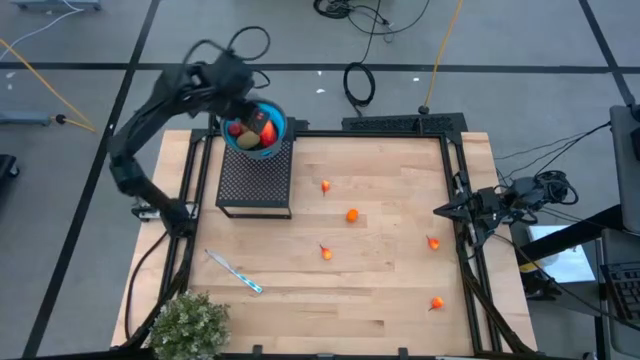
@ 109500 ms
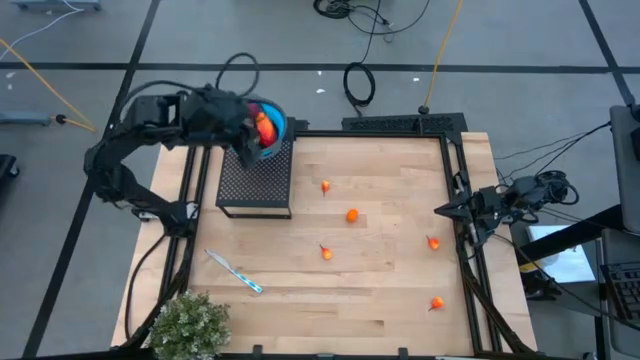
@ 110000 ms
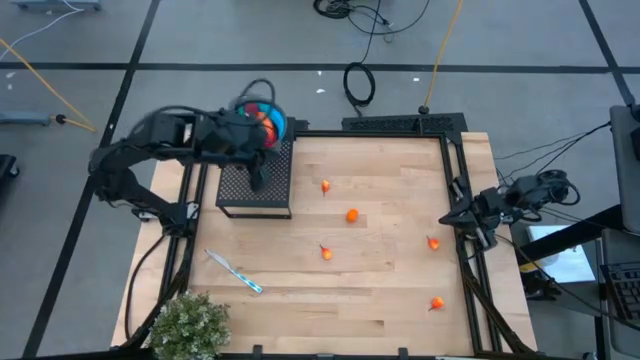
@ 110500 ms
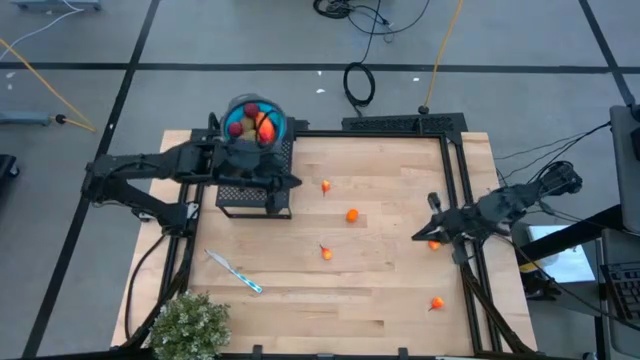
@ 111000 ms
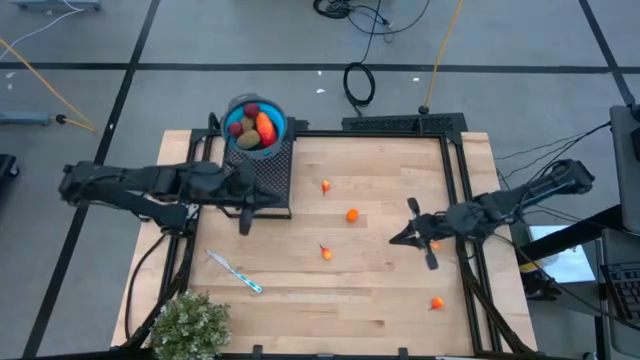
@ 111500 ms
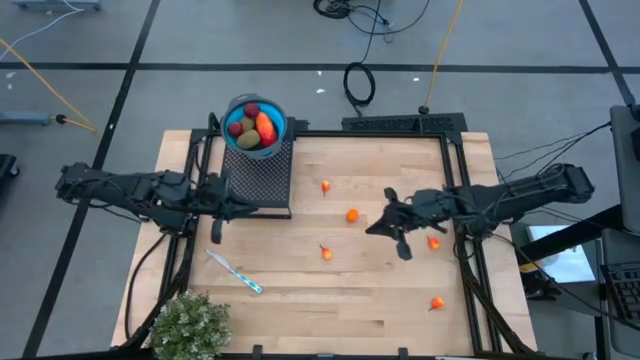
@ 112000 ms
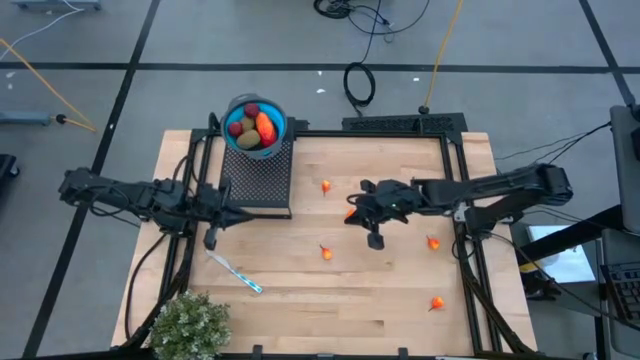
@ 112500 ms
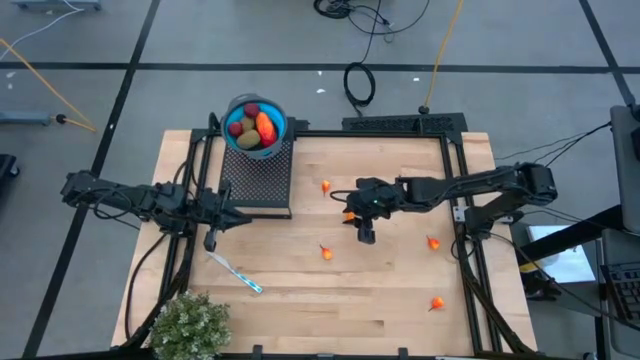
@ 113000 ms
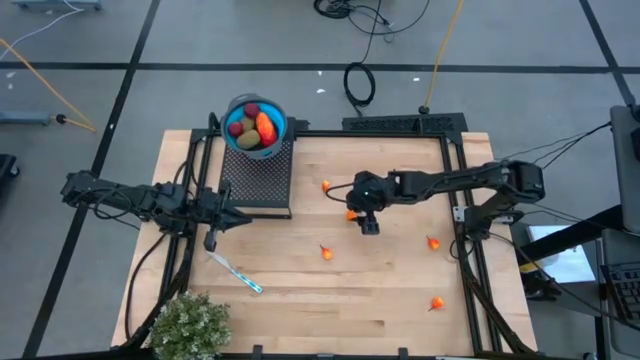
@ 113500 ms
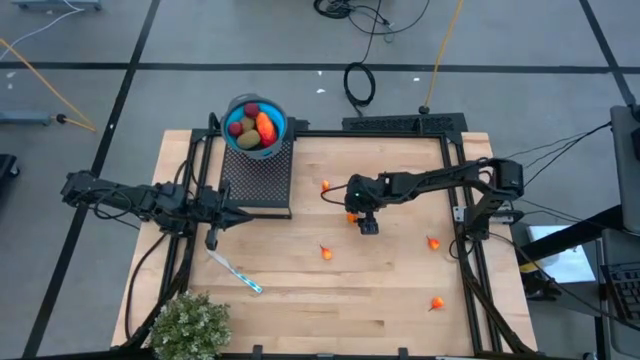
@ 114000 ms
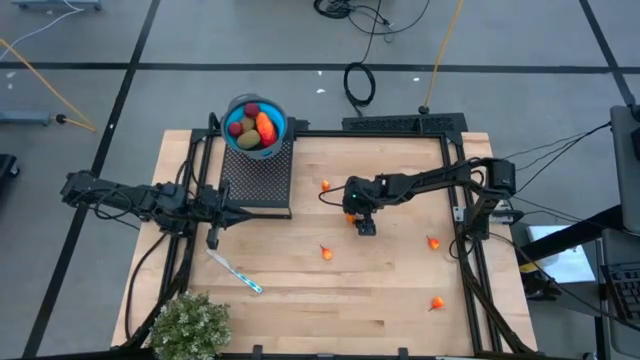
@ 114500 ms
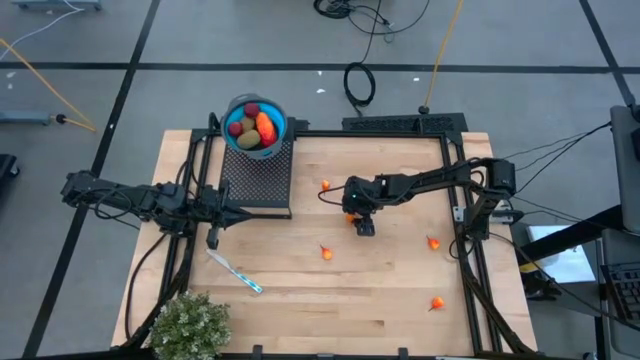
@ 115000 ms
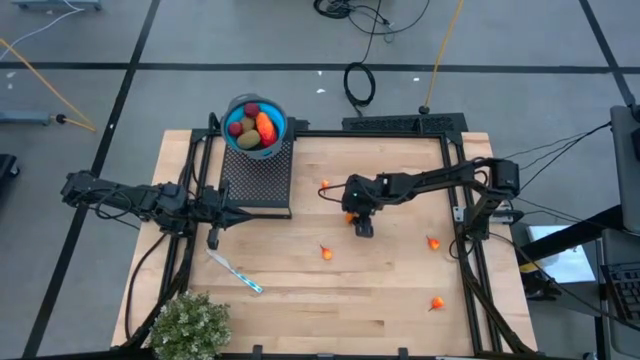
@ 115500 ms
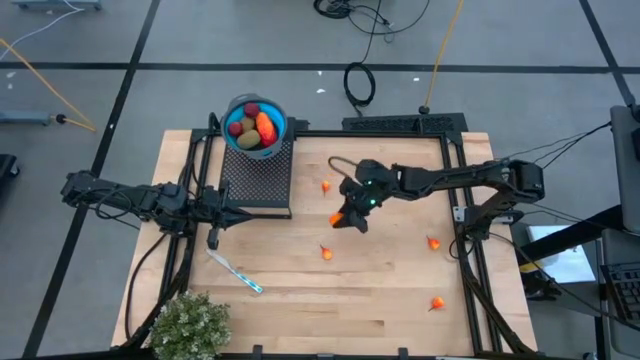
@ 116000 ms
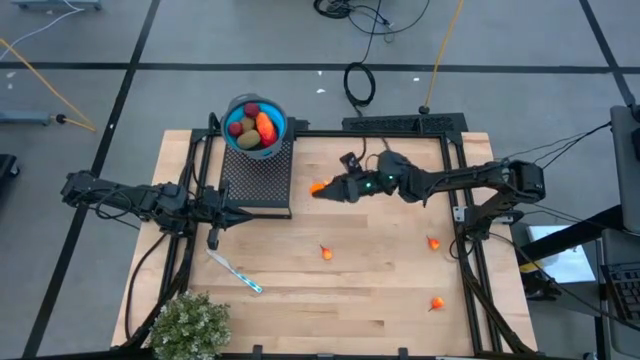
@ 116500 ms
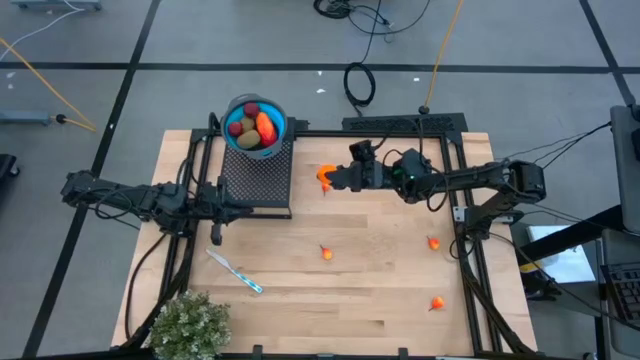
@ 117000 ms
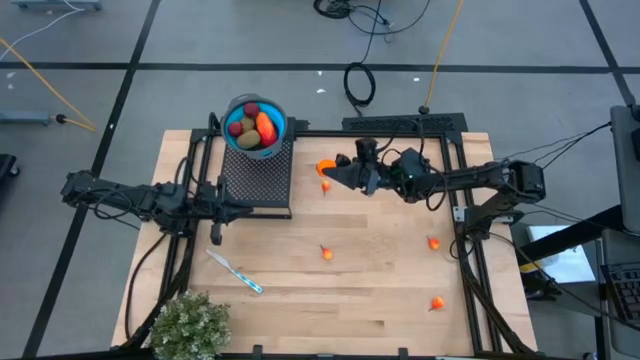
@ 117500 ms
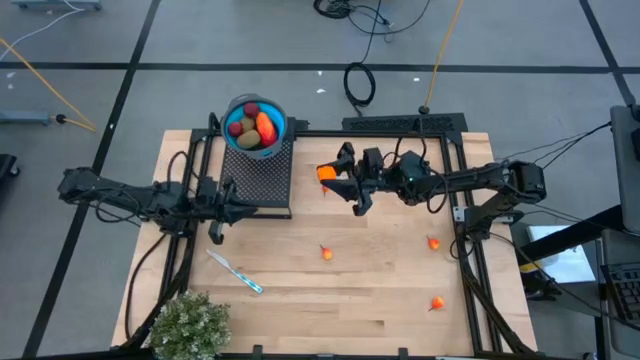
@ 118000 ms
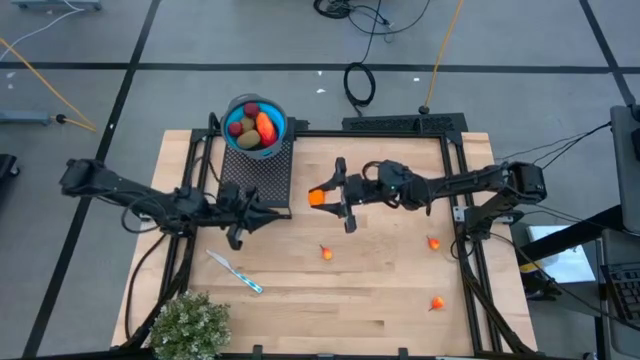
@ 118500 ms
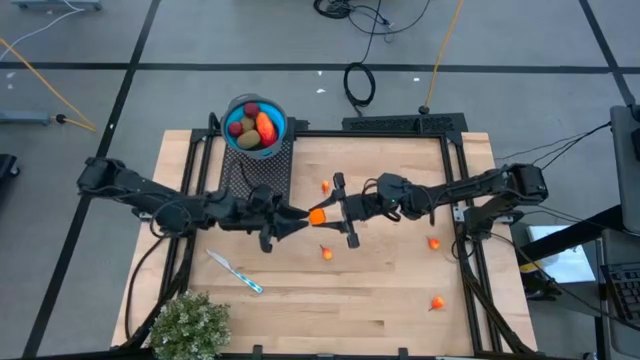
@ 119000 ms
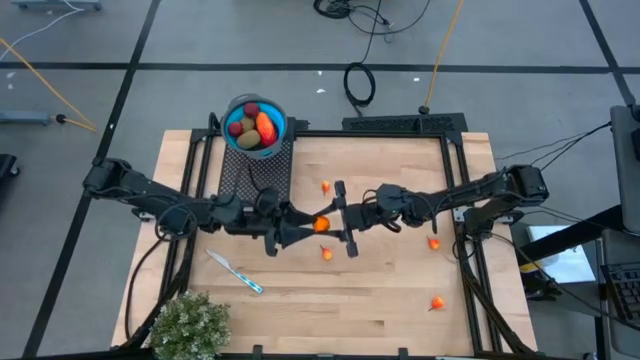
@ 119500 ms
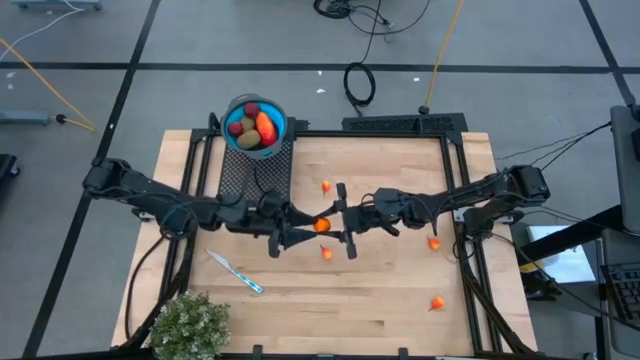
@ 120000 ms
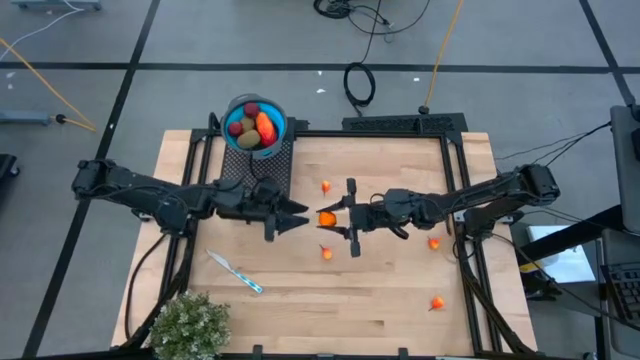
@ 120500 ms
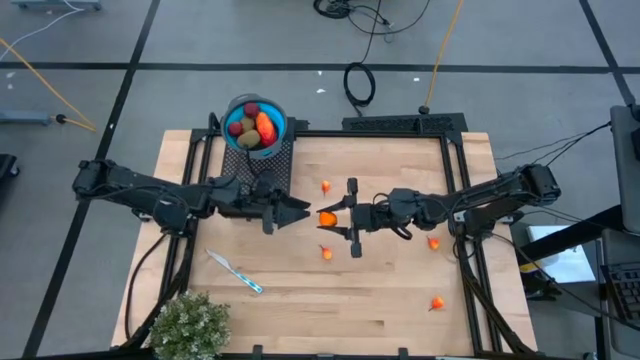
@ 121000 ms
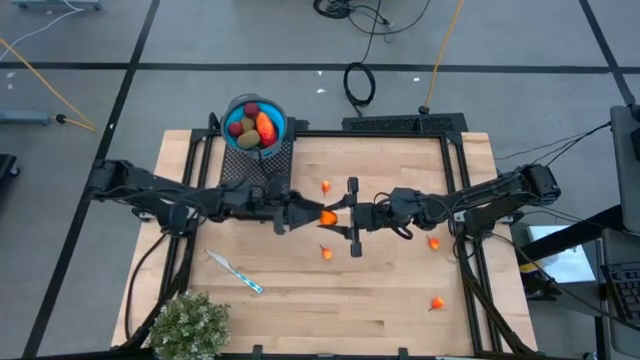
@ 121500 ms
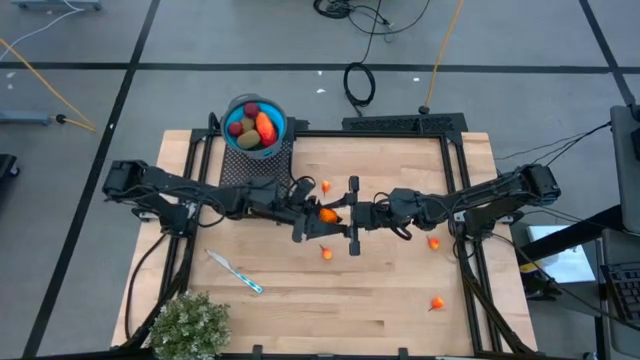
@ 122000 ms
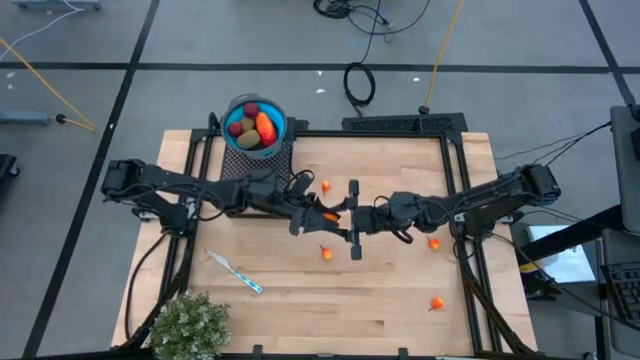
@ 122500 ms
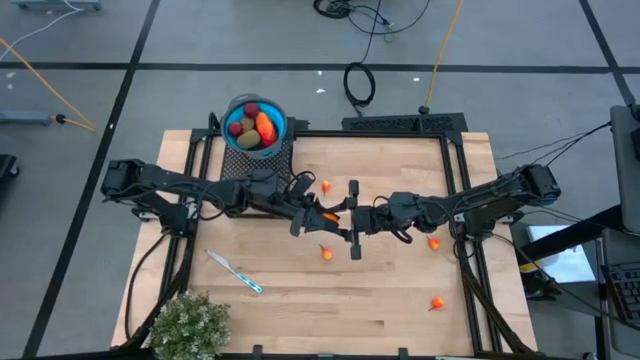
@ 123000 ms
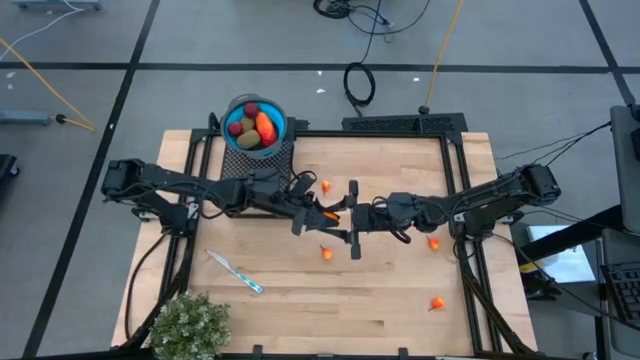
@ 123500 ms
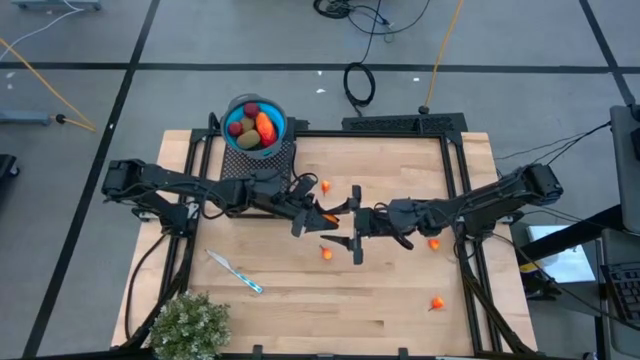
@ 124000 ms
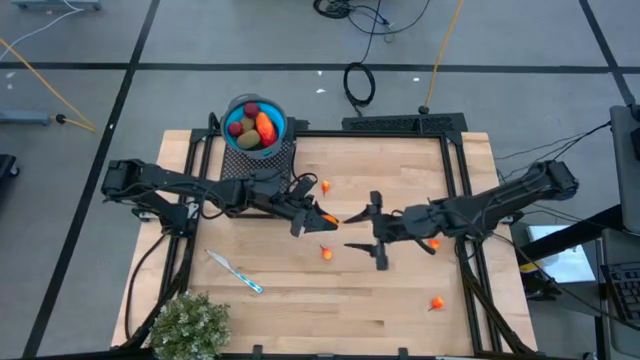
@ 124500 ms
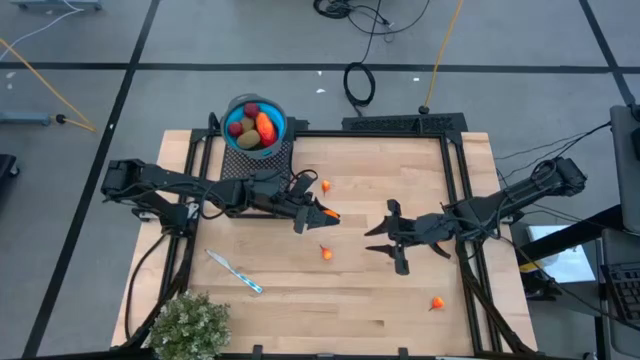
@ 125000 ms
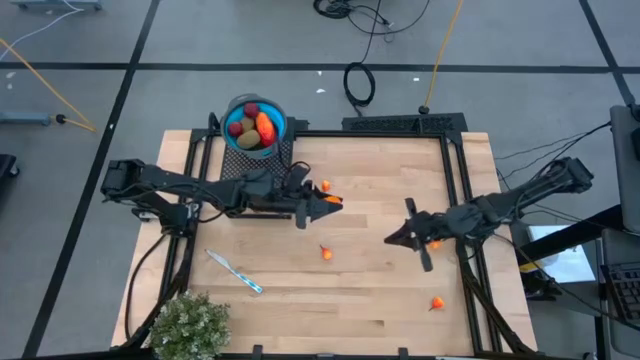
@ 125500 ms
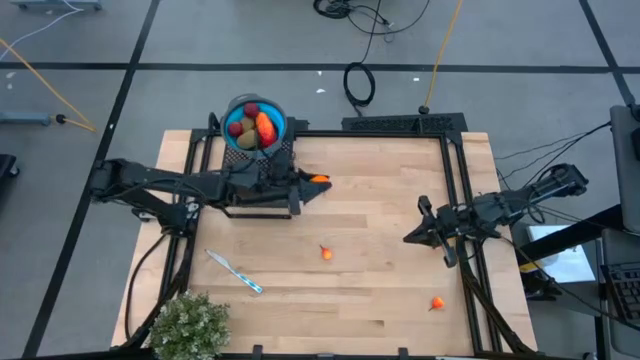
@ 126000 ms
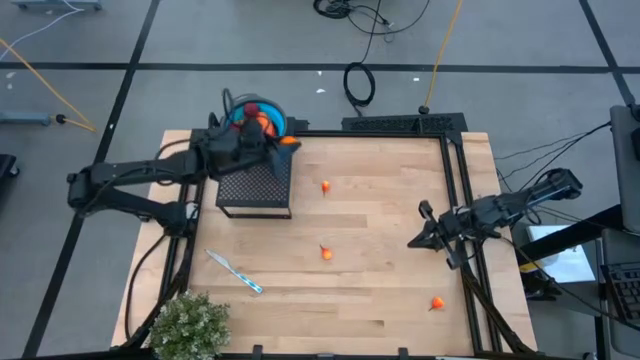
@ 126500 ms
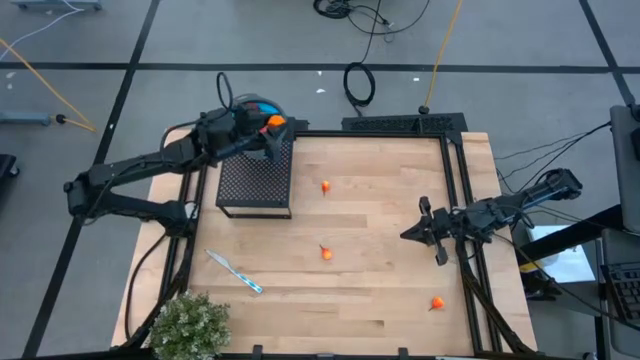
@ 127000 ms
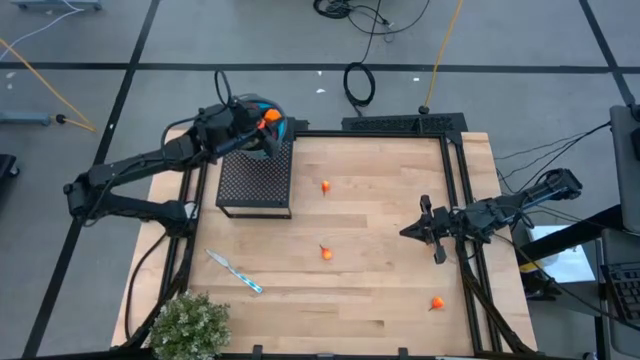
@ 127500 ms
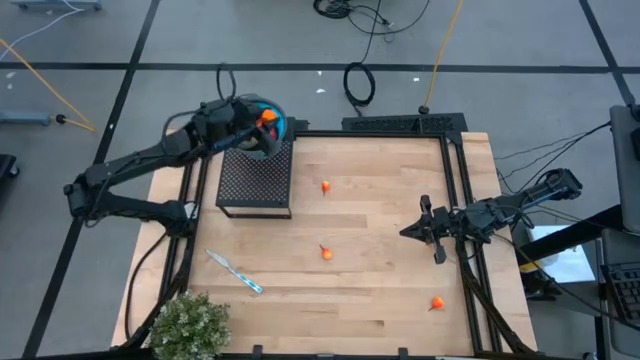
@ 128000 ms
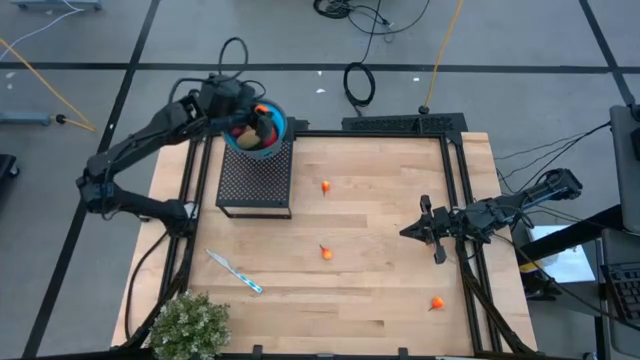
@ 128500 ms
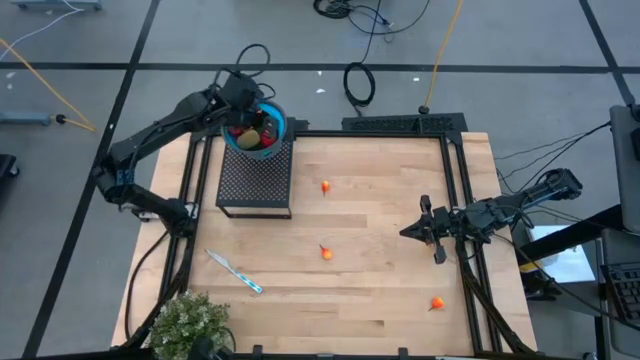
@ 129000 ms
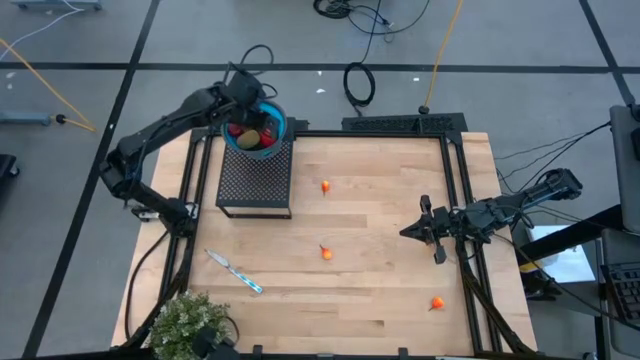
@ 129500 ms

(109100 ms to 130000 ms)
Task: Pick & Place Fruit
Put the orange into the blue strainer bowl on the shelf

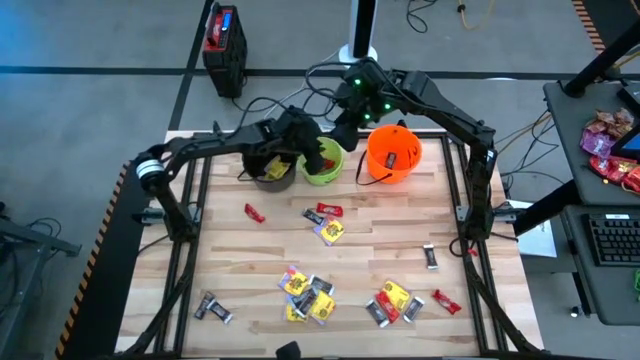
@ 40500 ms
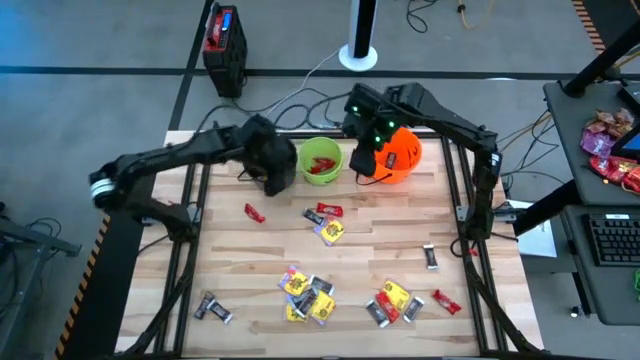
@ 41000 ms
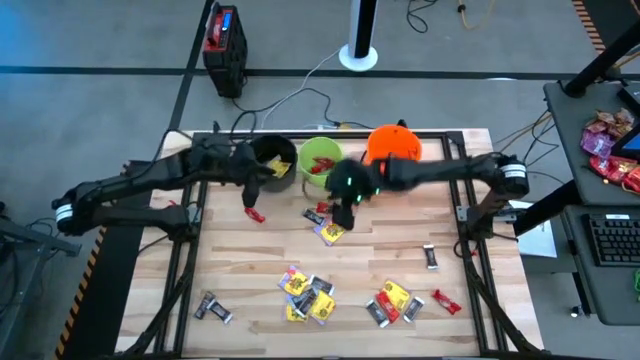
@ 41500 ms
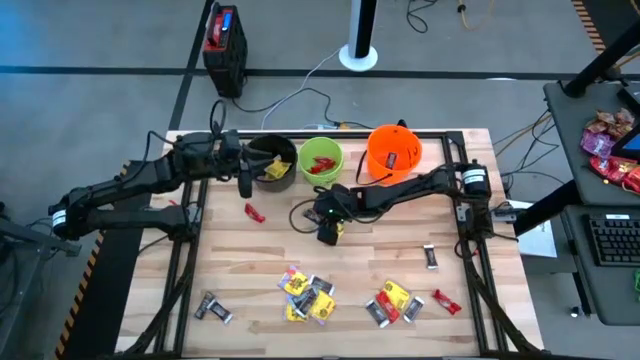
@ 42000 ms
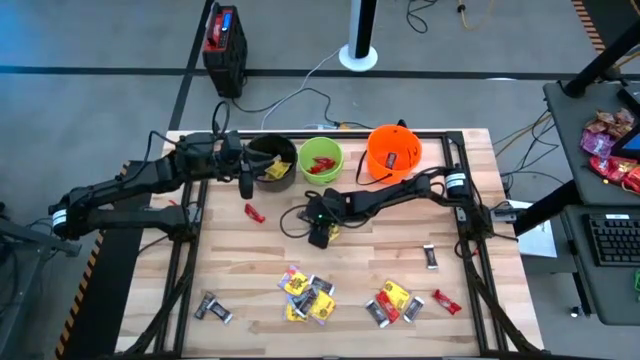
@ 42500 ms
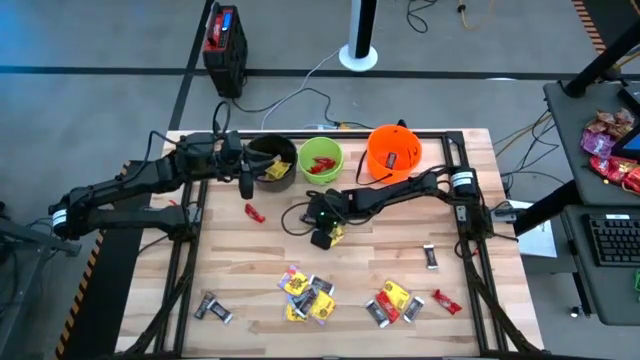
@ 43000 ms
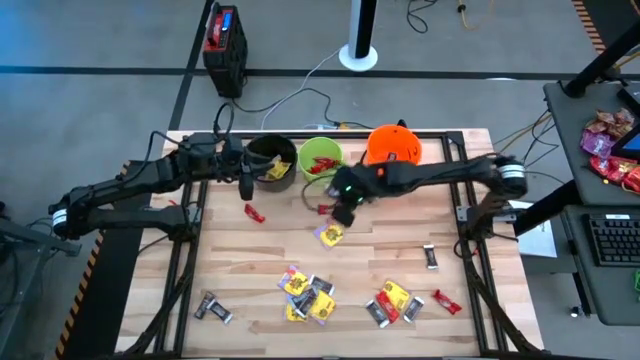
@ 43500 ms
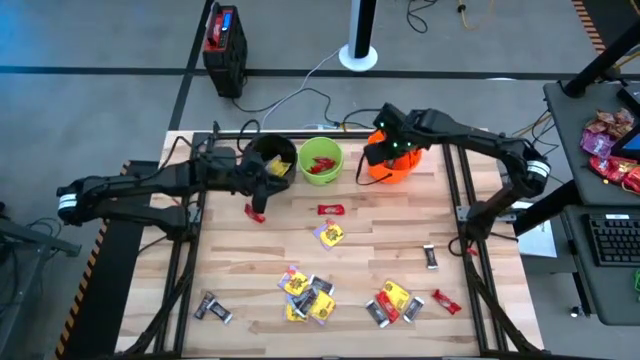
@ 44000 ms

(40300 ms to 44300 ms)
Task: Sort candy by brand, put in halloween buckets
Put the brown chocolate bar into the orange bucket
